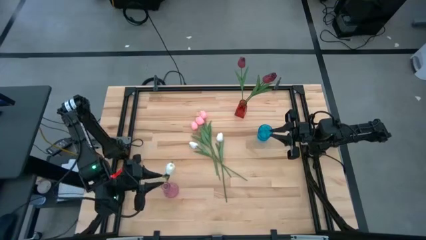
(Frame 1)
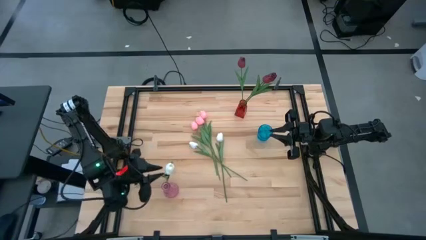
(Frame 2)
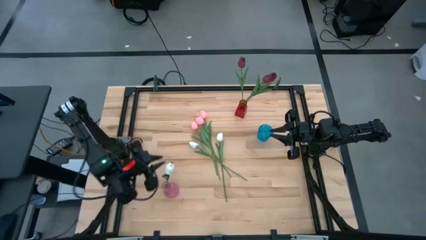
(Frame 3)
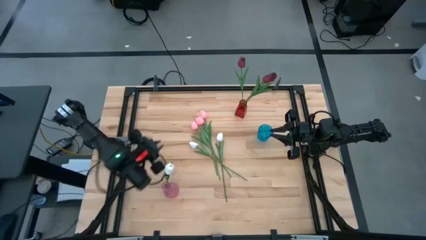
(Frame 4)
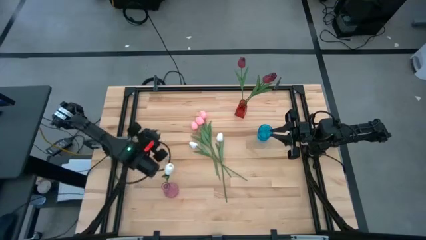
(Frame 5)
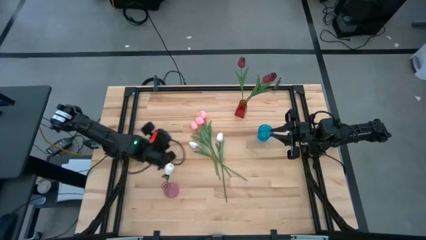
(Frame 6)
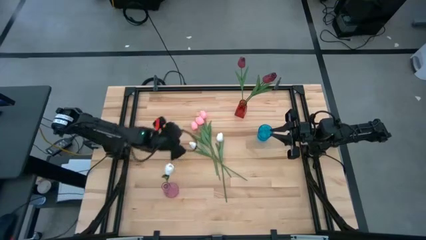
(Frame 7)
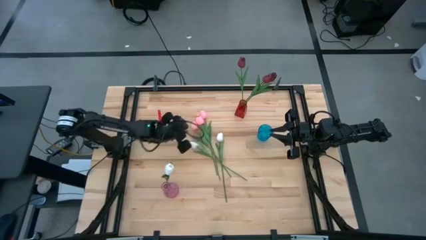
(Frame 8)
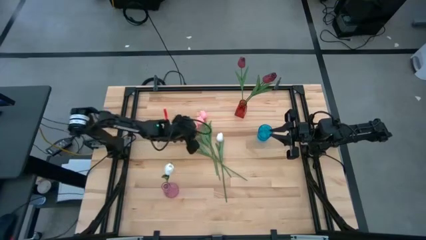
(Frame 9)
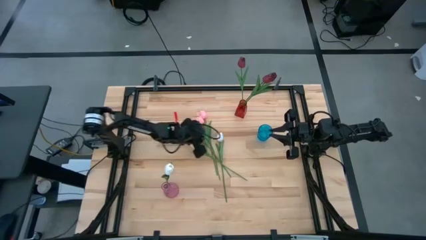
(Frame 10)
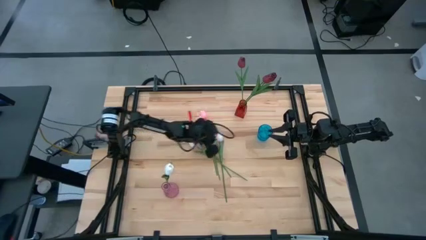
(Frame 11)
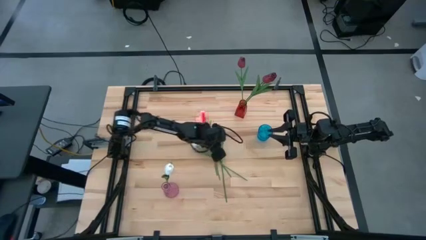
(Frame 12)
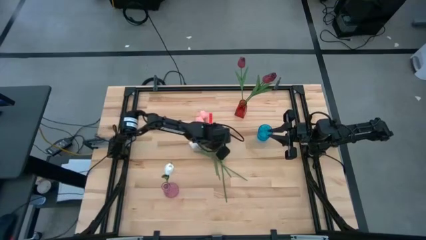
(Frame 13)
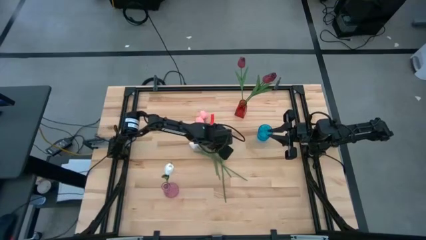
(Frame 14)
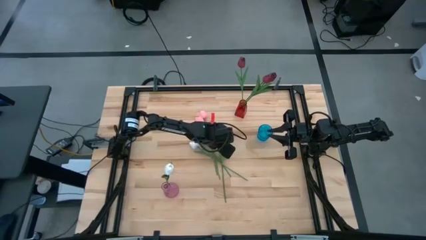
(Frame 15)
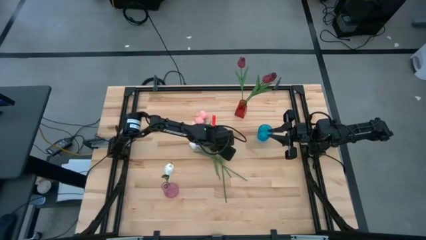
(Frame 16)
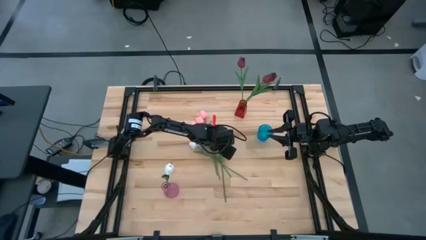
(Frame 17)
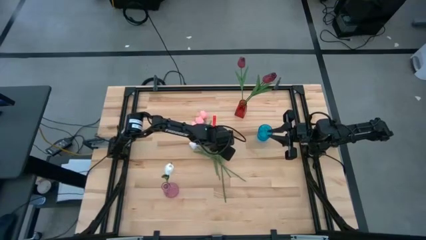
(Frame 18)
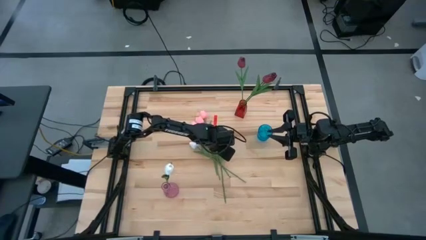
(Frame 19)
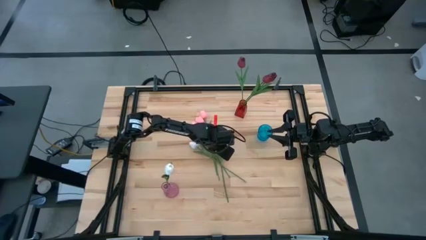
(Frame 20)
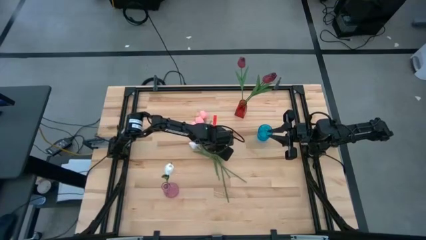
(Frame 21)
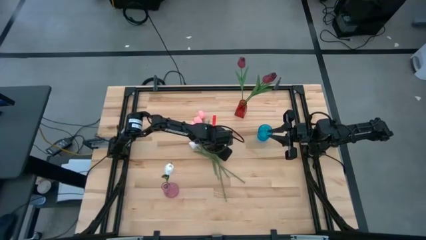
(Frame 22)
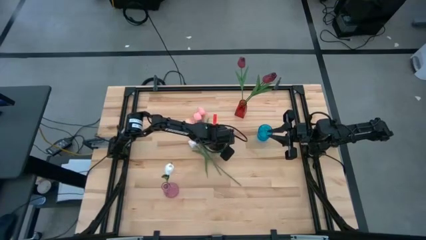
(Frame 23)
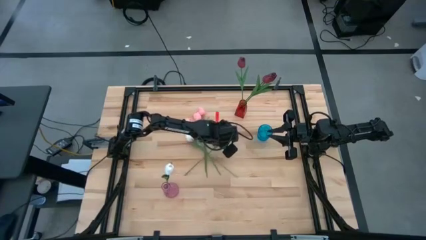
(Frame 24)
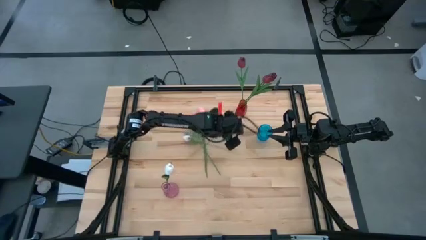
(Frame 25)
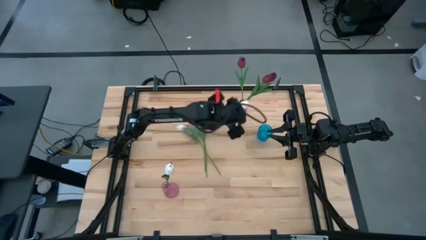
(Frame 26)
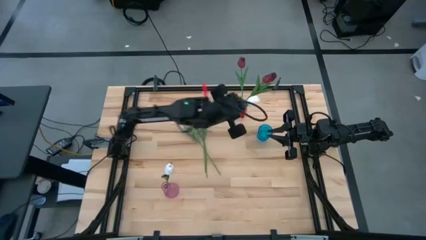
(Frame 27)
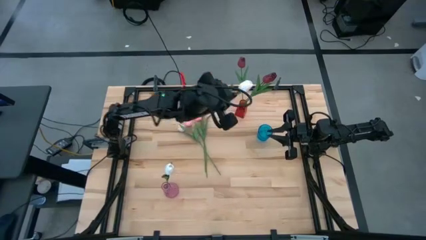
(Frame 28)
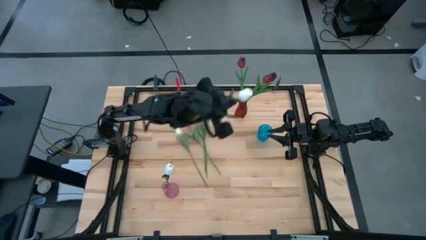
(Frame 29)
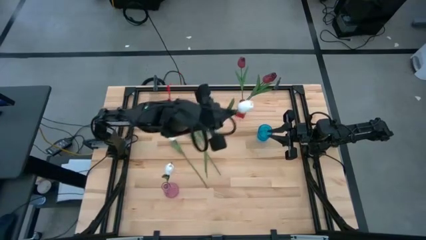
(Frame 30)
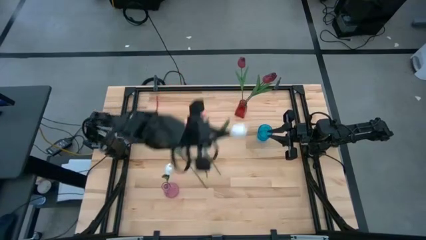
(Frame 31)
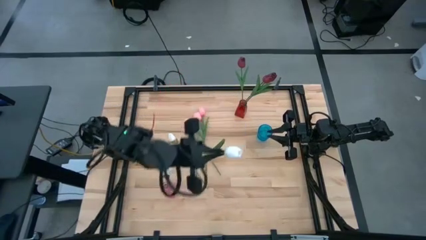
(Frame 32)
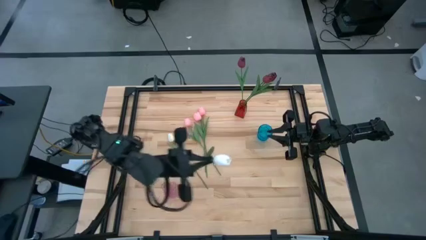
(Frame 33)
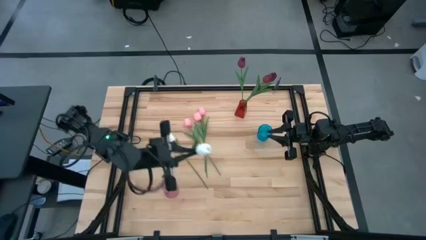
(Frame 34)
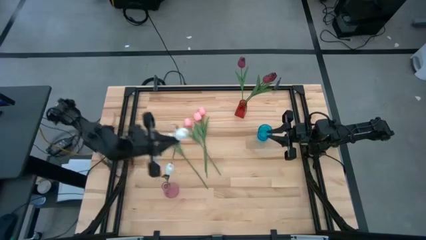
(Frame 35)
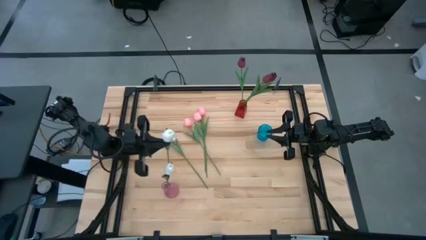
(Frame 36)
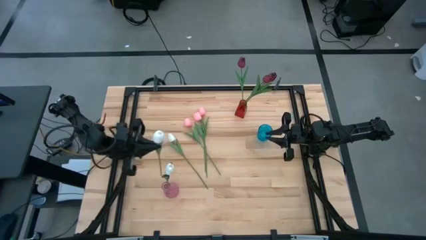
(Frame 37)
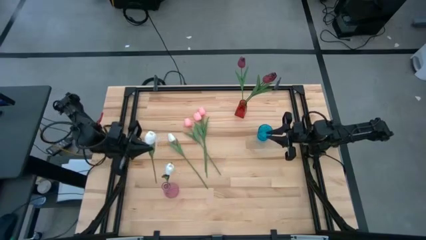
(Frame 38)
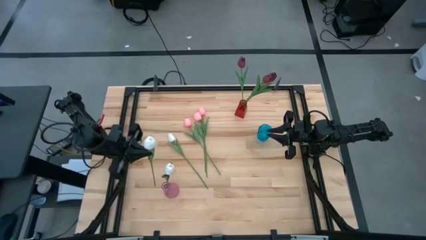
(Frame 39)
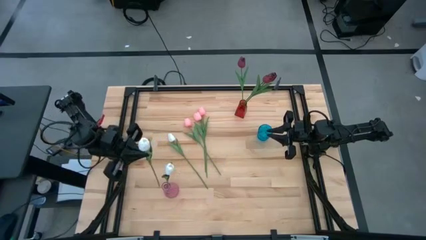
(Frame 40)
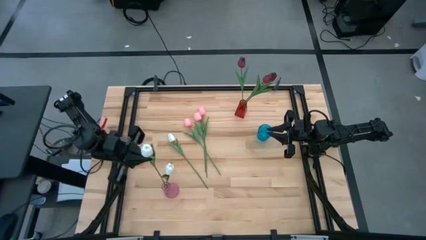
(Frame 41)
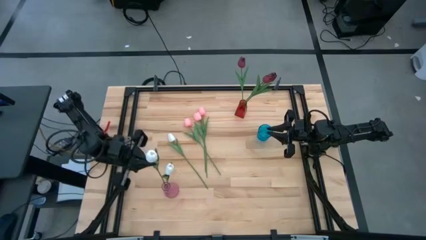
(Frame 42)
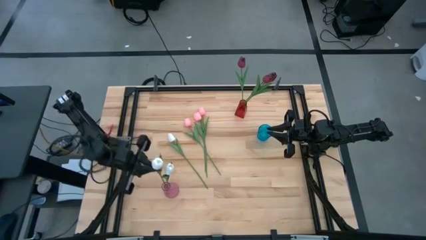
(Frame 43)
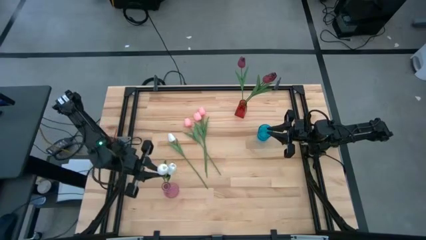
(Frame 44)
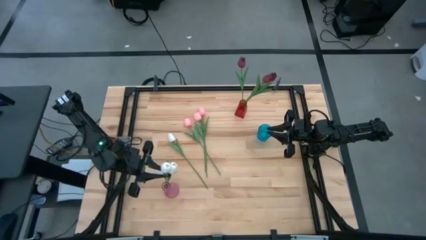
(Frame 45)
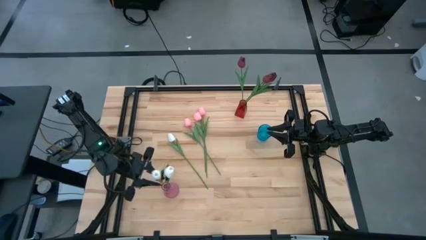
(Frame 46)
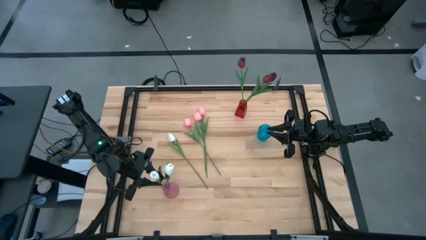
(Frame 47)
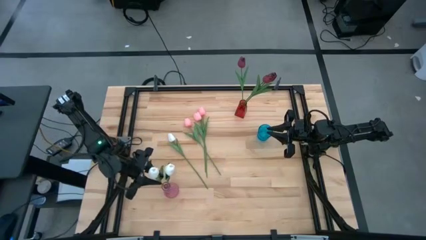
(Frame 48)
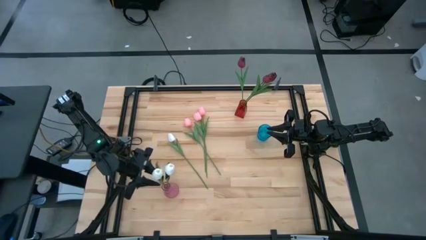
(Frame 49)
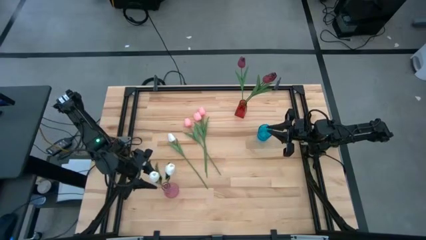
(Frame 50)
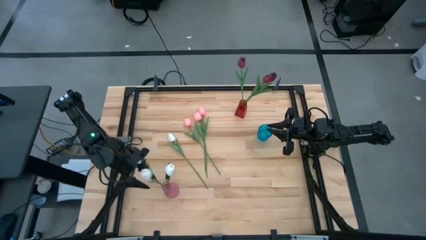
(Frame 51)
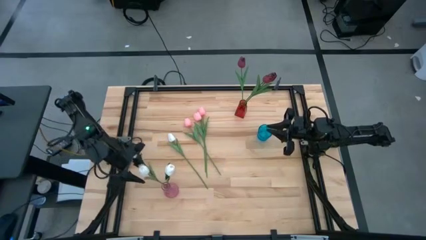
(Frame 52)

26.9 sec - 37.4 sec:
Task: Sort flowers into vase by color
Put the right white tulip into the pink vase
